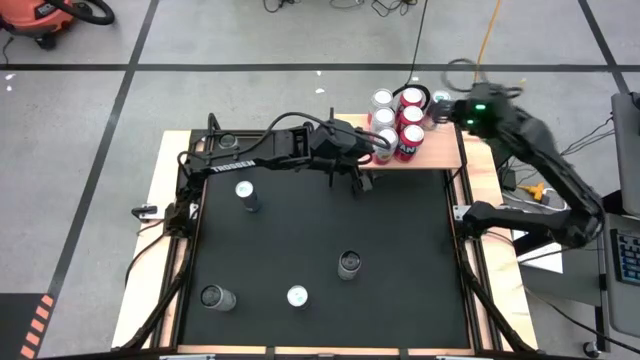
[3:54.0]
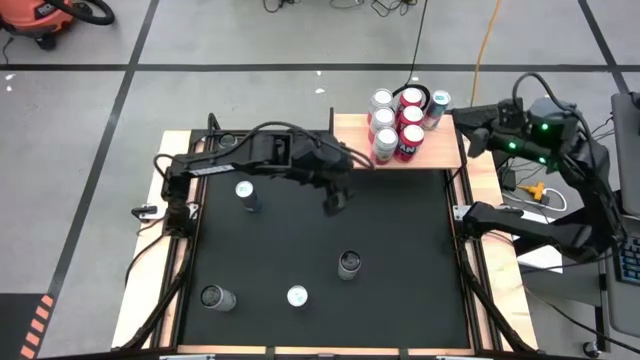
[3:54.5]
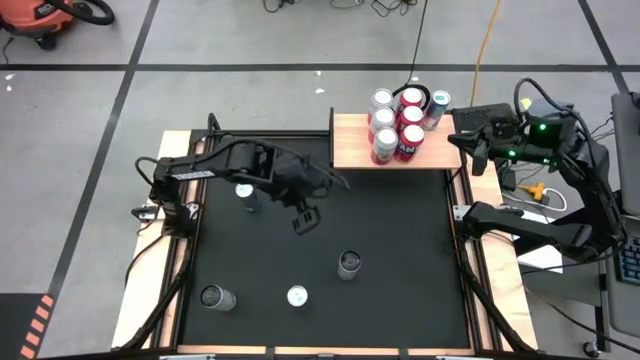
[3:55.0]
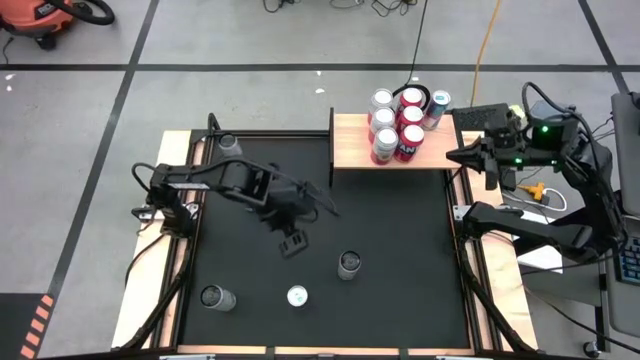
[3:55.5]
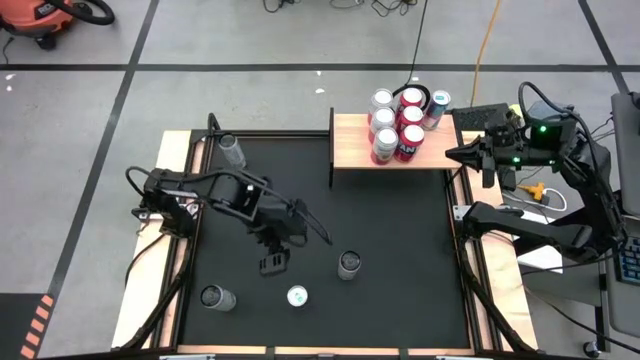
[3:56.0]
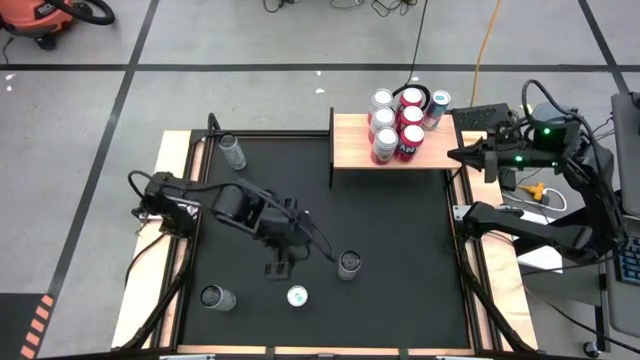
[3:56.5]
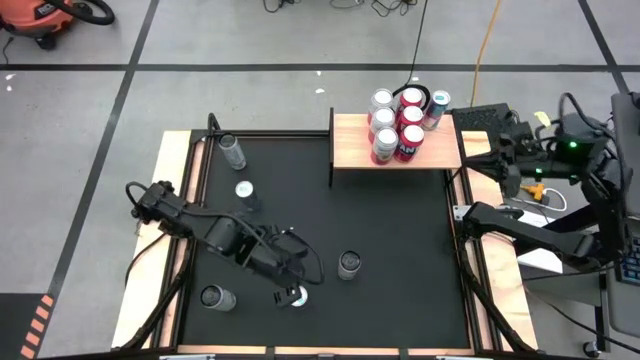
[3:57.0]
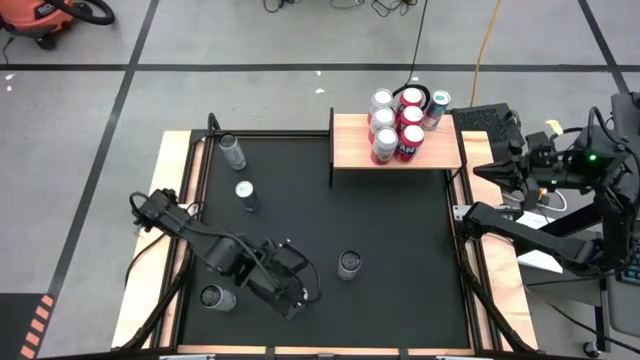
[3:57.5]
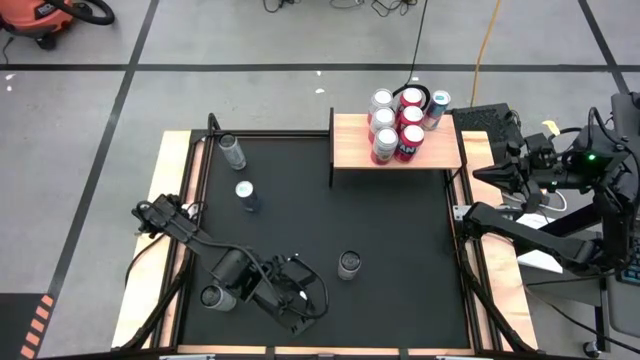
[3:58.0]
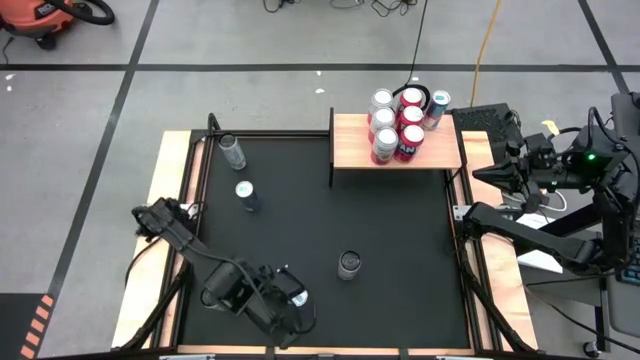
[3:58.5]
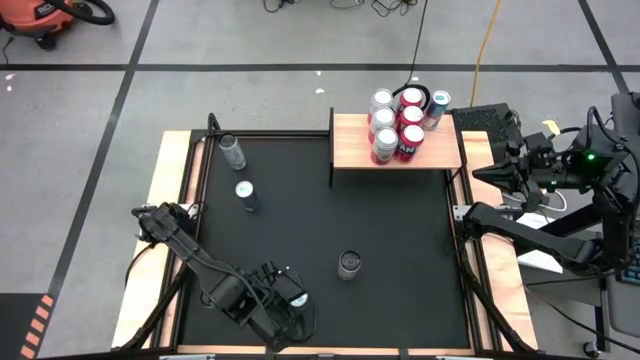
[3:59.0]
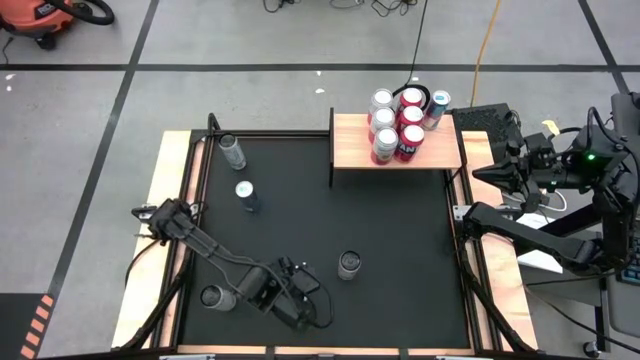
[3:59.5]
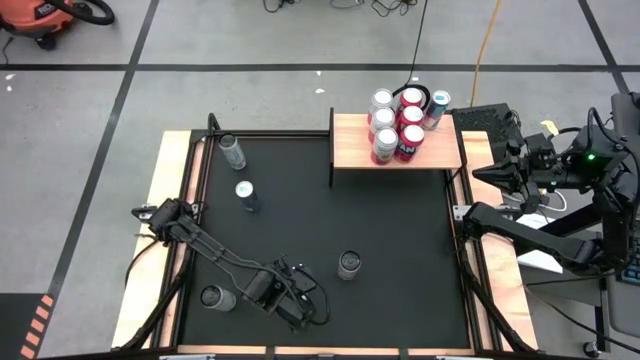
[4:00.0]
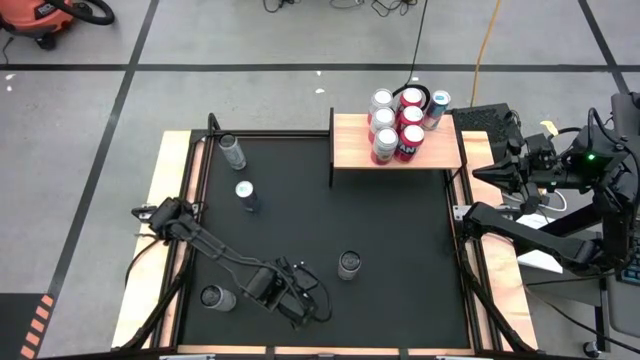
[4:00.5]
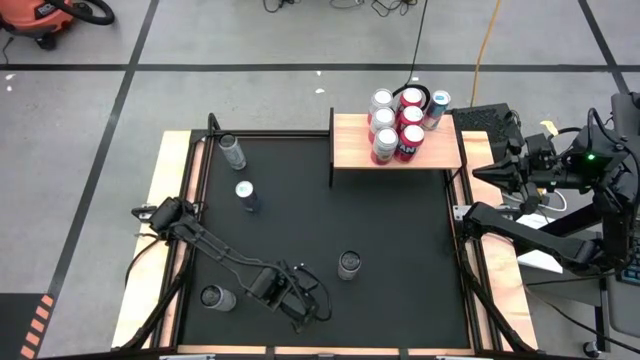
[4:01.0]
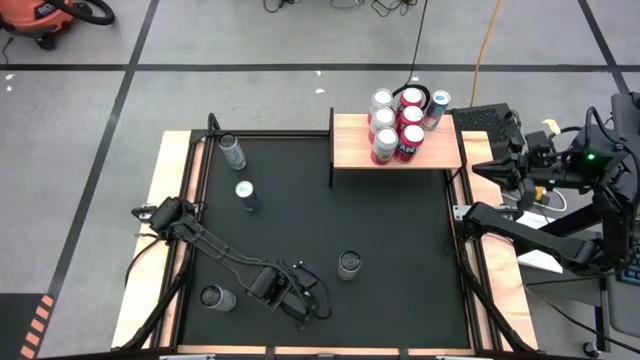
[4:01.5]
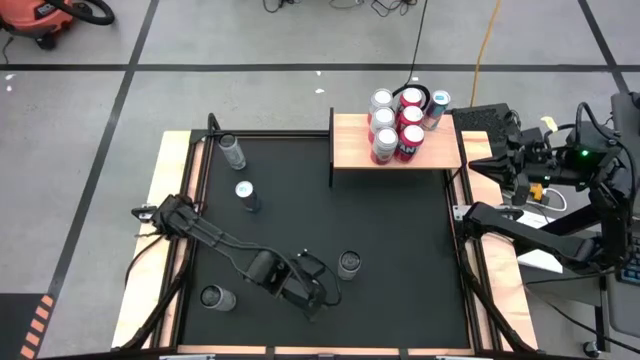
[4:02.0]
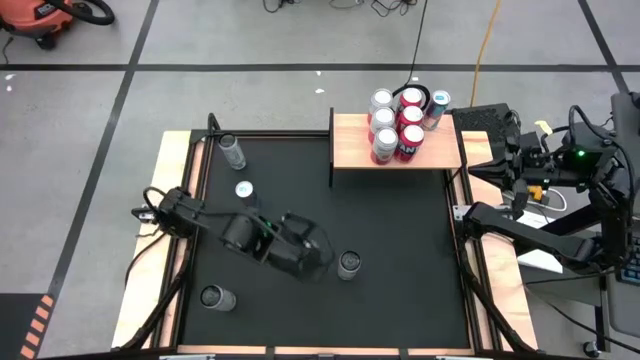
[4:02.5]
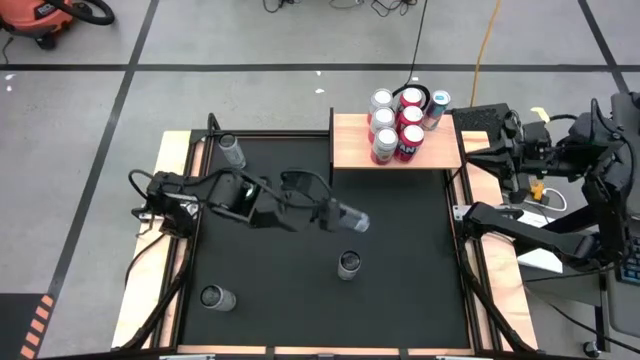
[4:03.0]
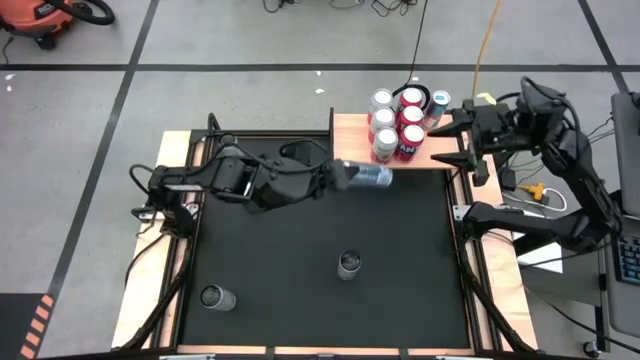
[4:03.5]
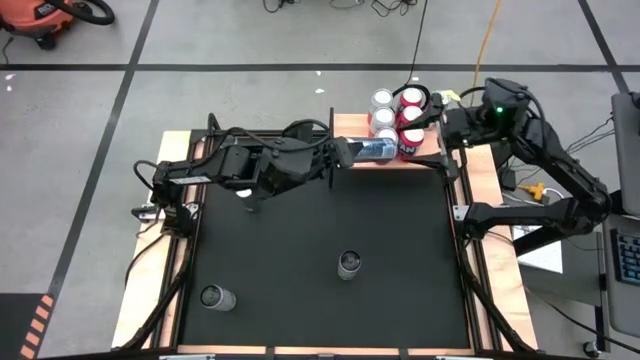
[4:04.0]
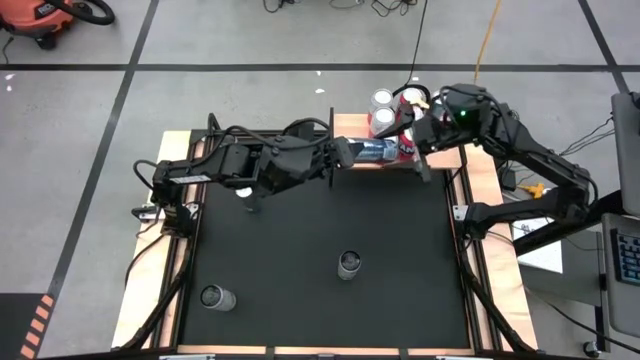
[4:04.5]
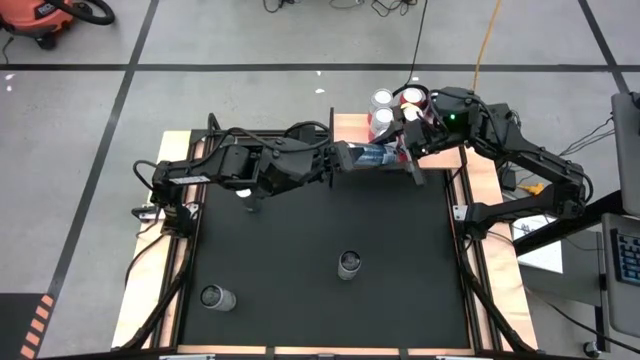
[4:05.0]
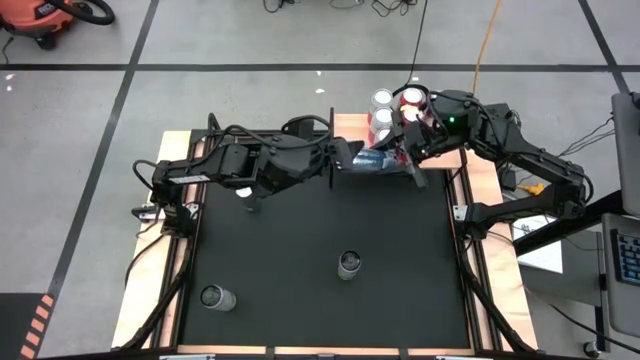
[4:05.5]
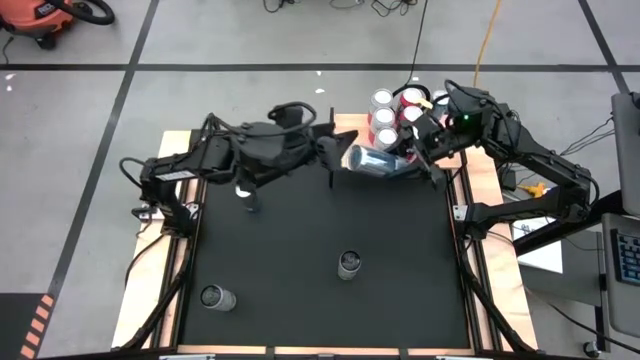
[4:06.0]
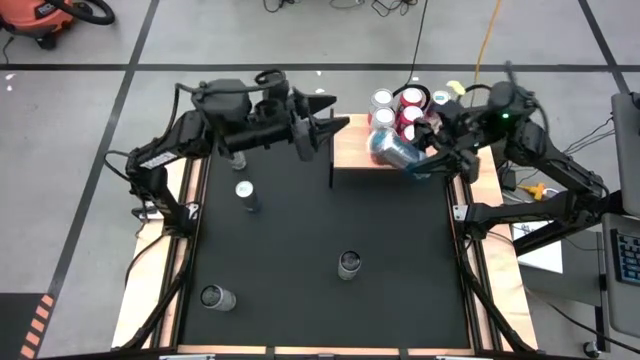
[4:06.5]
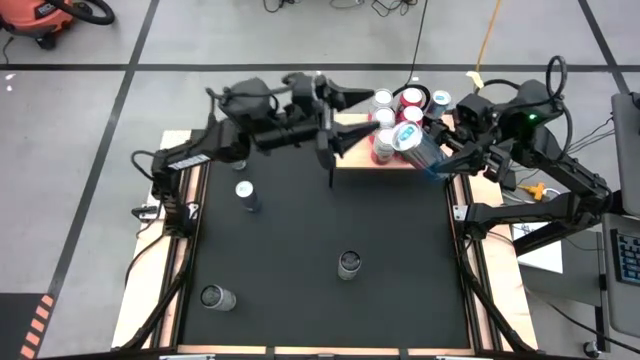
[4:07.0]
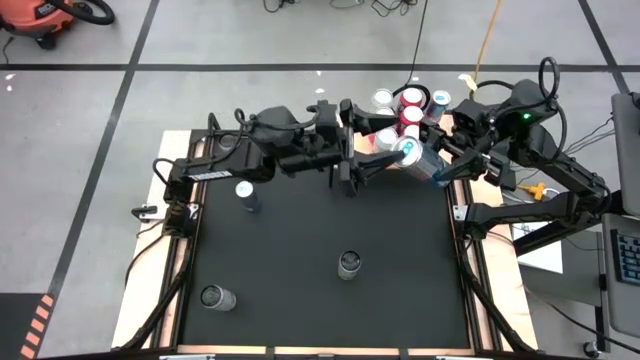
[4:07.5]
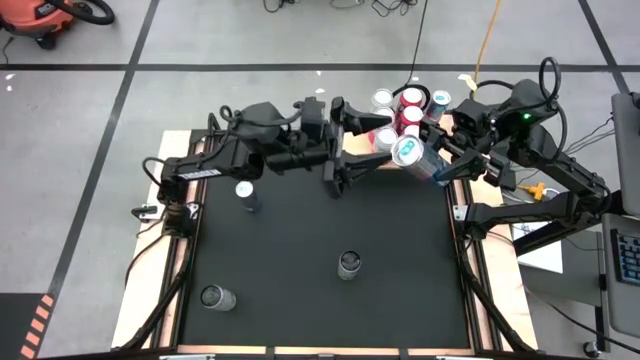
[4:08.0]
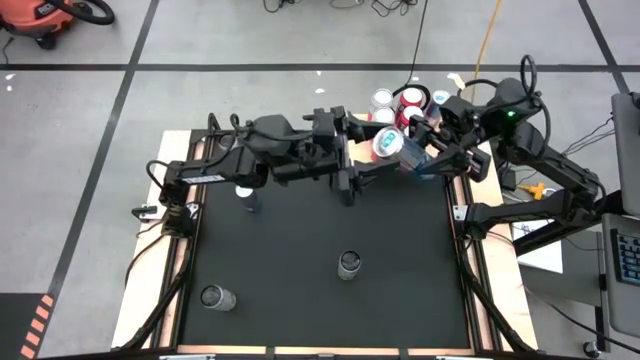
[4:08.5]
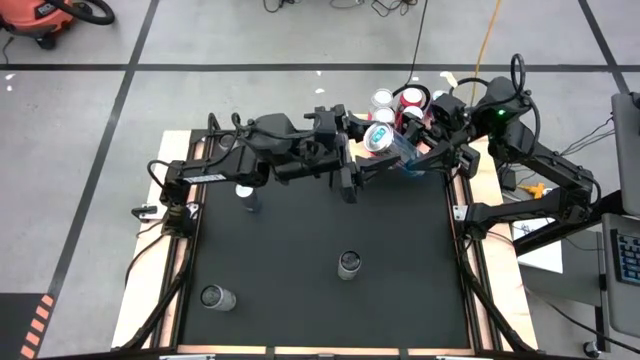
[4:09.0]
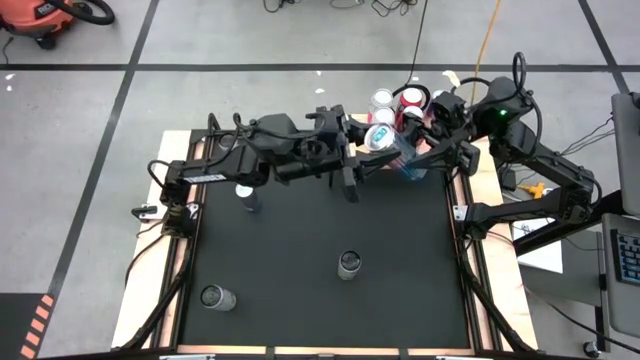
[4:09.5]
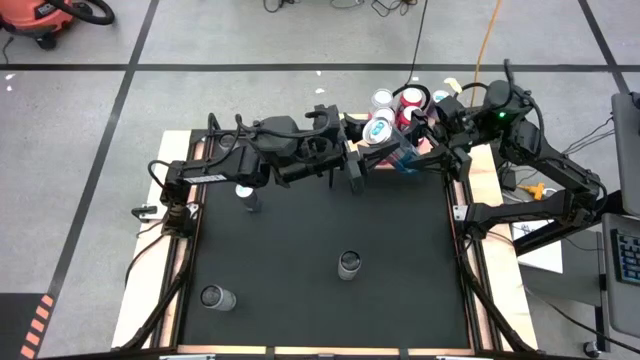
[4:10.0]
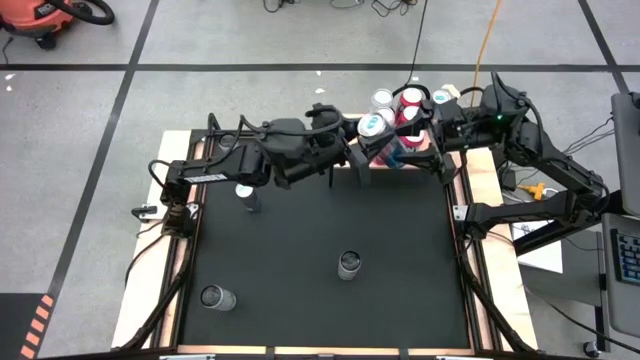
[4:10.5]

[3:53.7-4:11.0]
Task: Place canned beverage on shelf
Put the bottom blue soda can on the shelf aligned with the other blue soda can

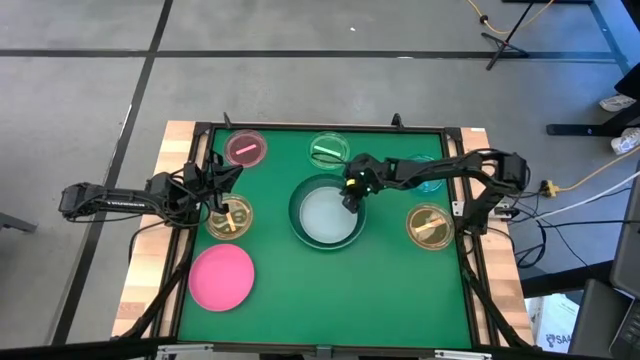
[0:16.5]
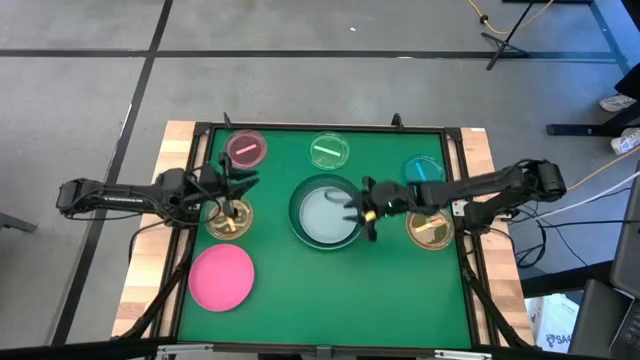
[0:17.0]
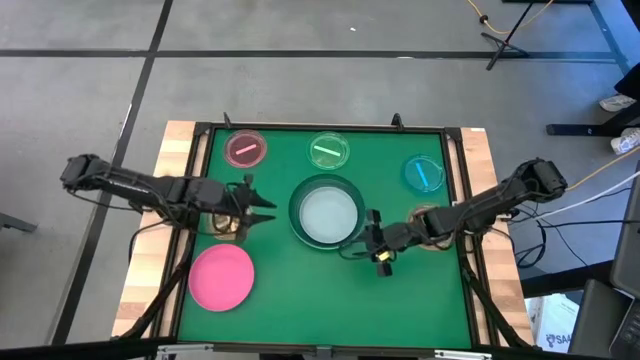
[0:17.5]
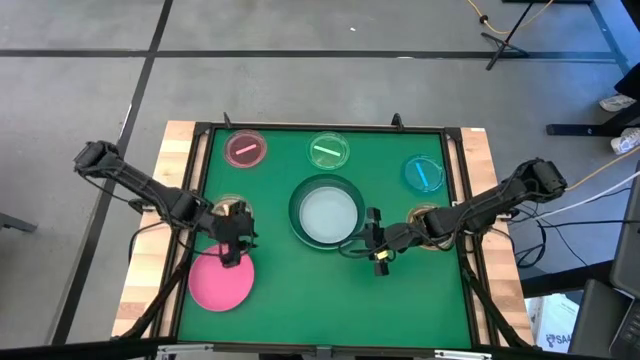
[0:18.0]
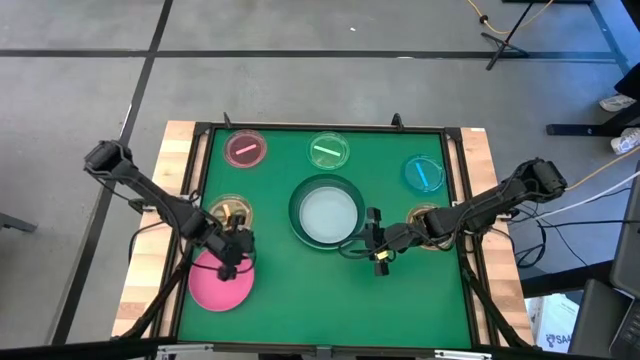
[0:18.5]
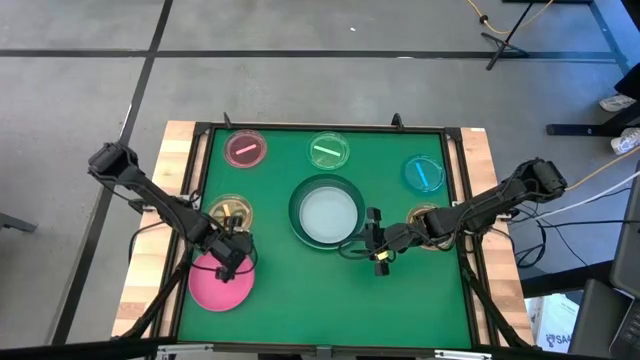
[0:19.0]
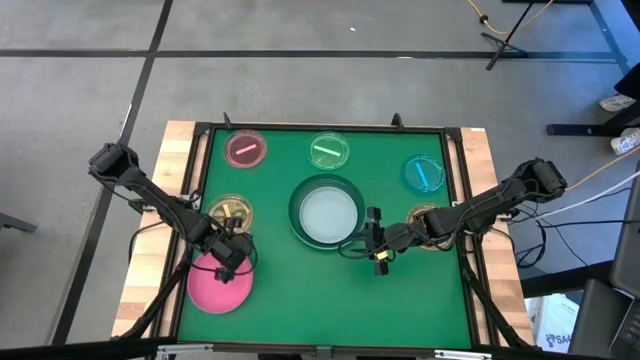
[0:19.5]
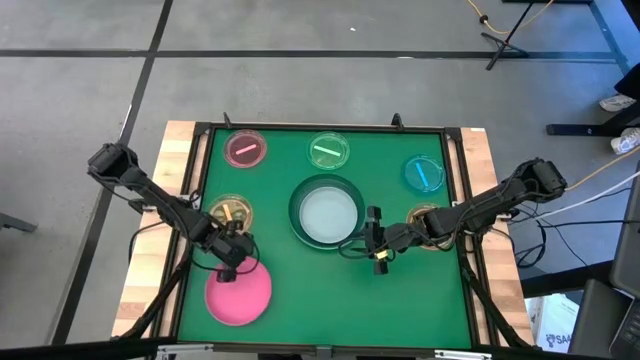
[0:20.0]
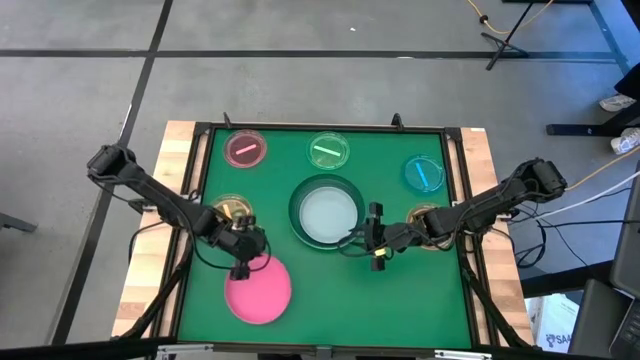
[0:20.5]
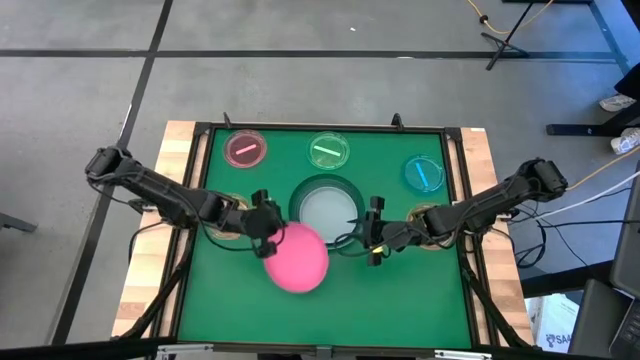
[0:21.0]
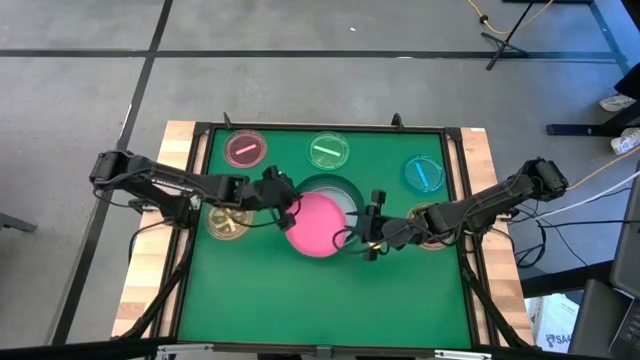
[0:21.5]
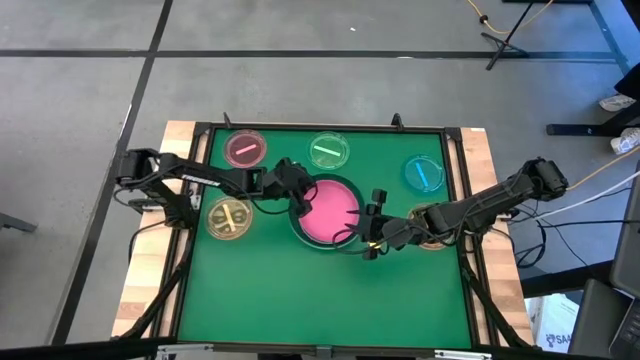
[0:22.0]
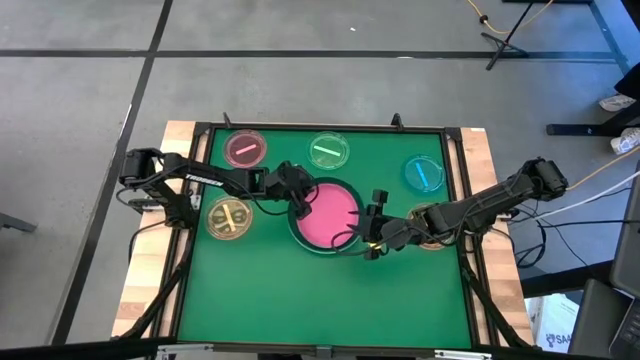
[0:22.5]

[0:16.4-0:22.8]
Task: Stack plastic plates
Stack the pink plate on the gray plate
